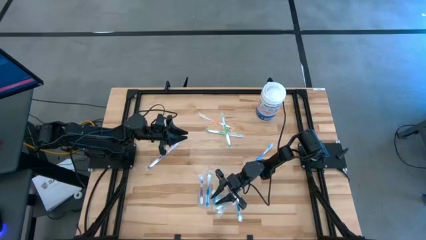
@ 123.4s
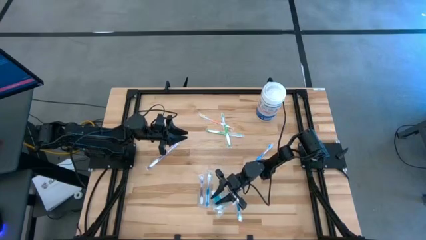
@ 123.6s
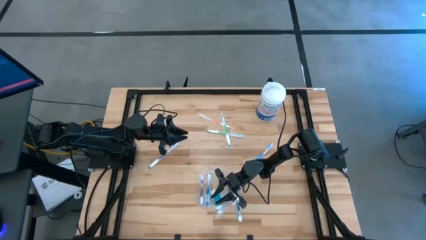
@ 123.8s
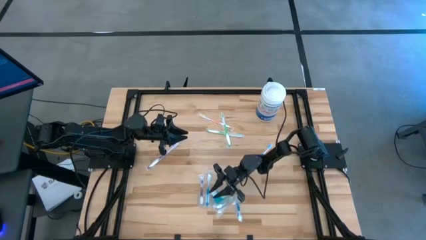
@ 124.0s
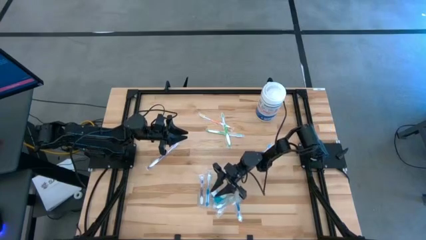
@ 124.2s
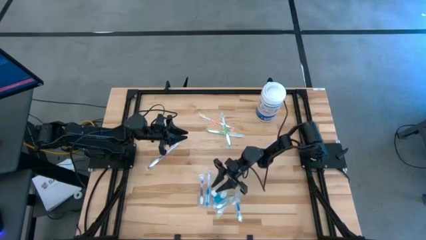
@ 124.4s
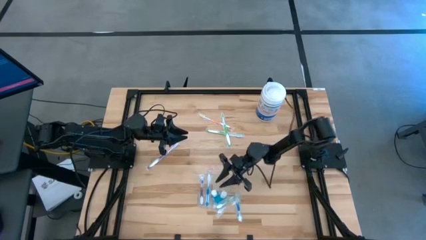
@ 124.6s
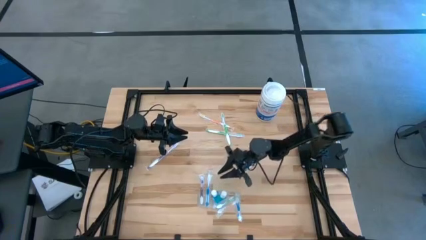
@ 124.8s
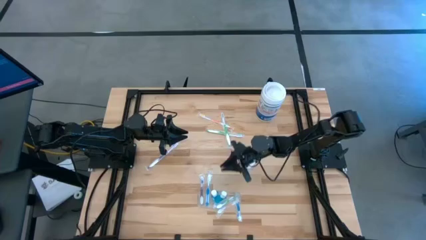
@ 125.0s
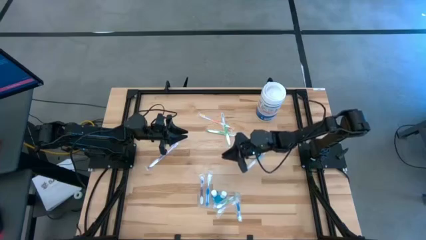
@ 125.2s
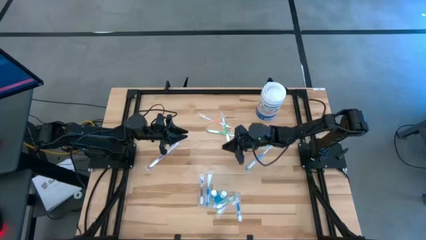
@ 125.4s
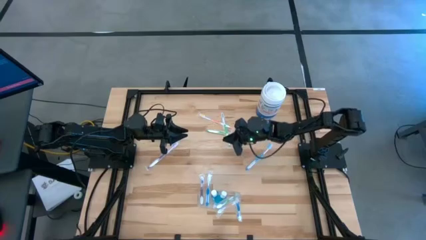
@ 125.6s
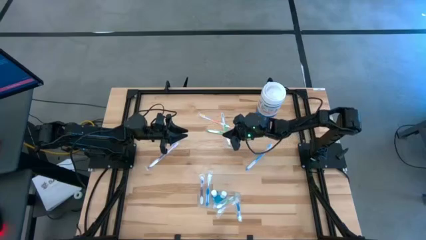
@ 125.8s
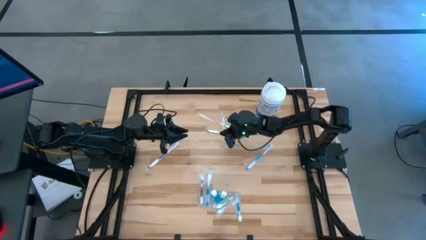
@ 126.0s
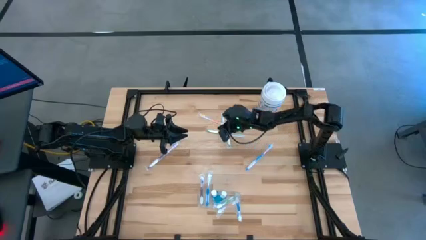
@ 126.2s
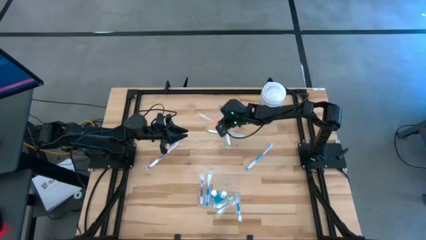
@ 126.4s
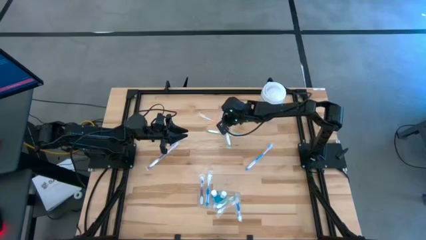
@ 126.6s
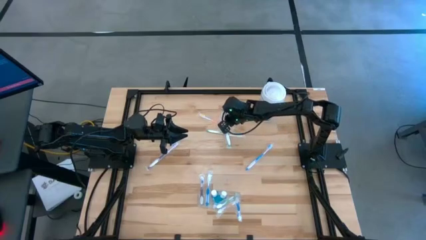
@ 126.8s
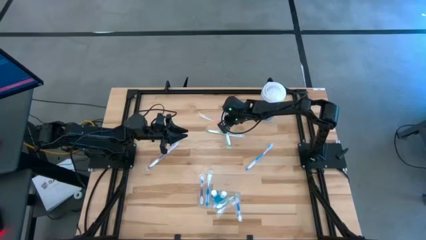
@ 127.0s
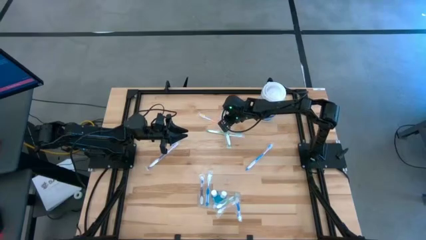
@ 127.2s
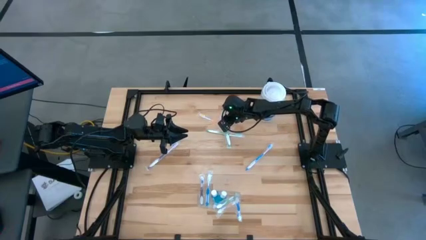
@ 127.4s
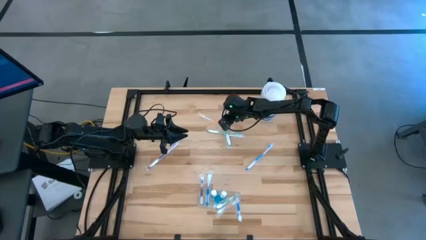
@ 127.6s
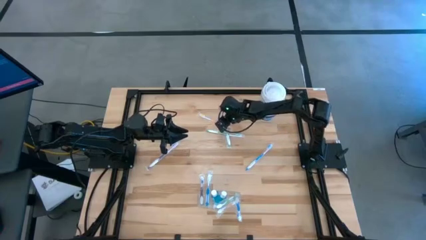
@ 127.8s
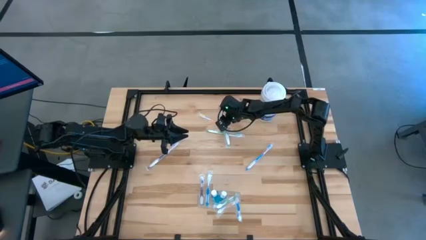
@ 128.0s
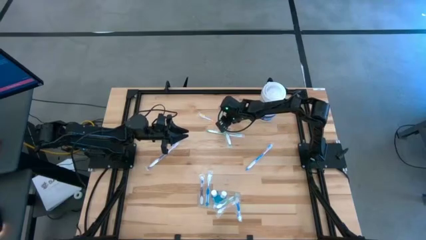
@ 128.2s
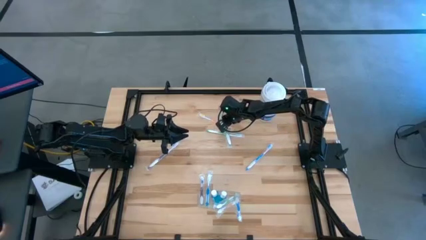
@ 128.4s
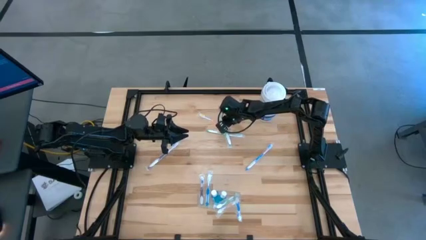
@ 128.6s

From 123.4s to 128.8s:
Task: Pick & Place toothbrushing station
Put the green toothbrush into the transparent organizer

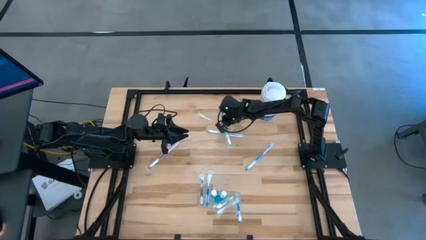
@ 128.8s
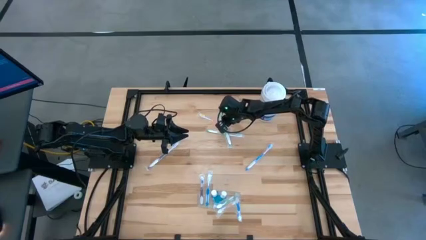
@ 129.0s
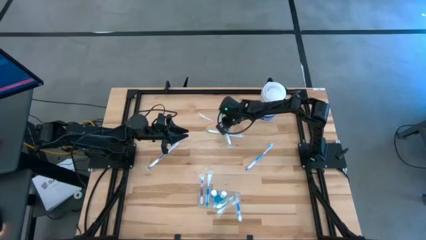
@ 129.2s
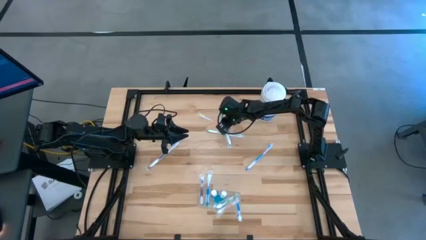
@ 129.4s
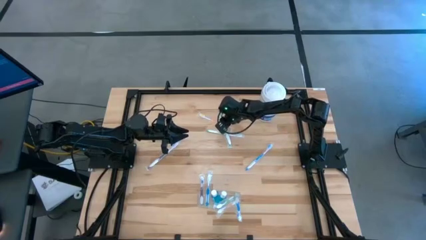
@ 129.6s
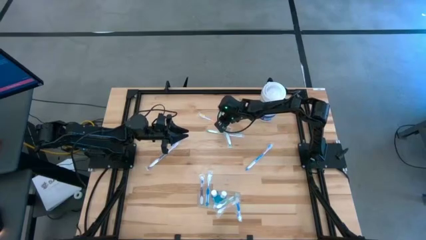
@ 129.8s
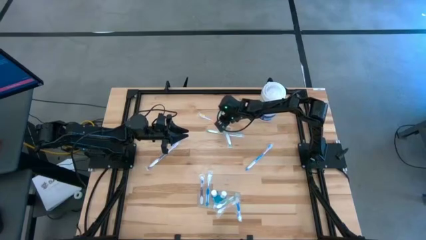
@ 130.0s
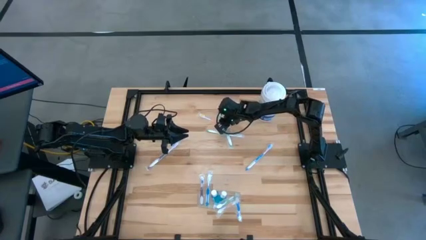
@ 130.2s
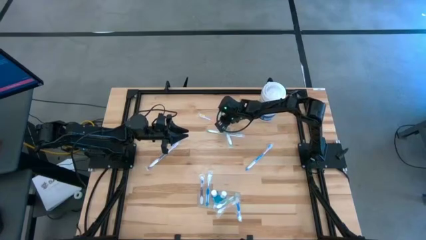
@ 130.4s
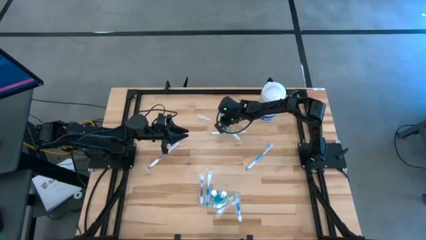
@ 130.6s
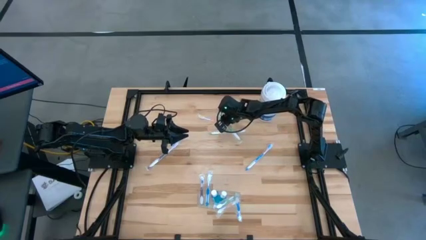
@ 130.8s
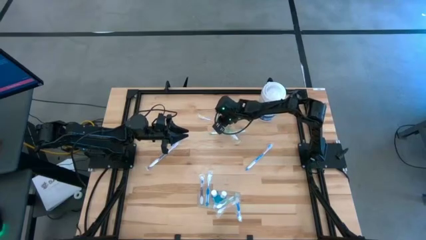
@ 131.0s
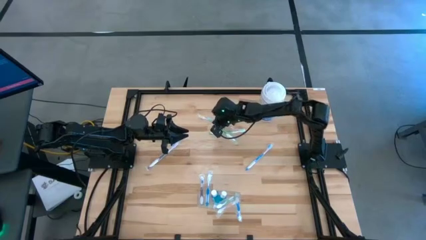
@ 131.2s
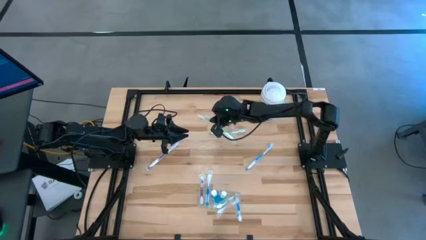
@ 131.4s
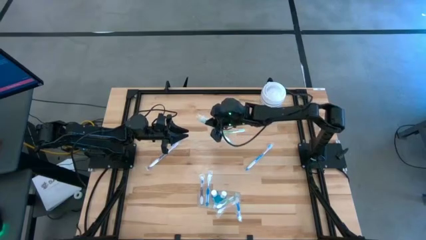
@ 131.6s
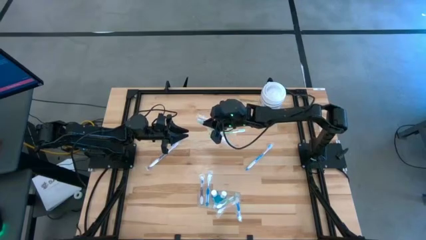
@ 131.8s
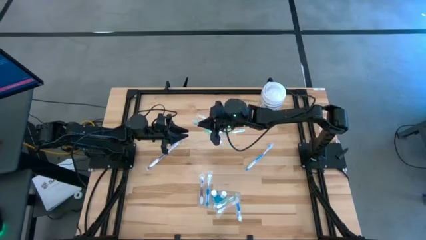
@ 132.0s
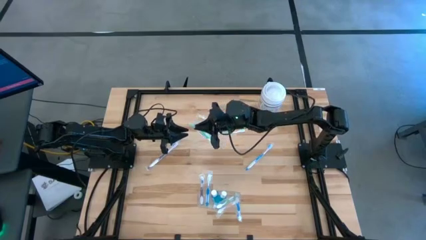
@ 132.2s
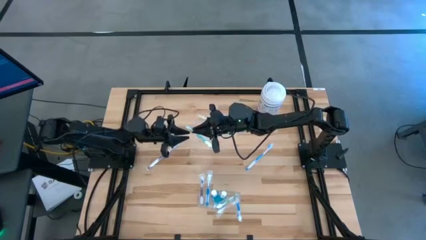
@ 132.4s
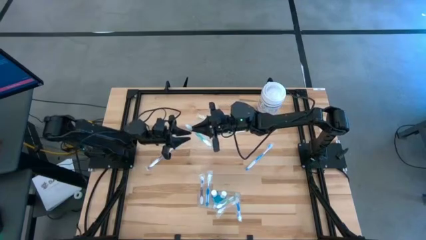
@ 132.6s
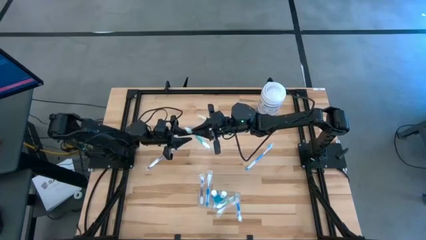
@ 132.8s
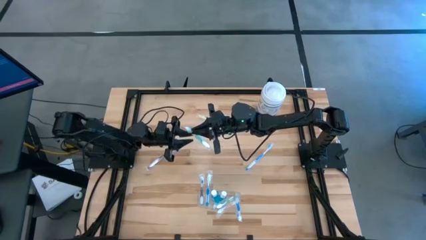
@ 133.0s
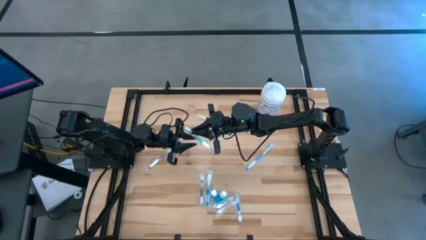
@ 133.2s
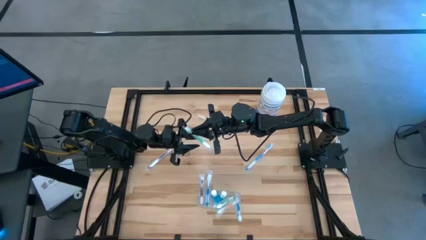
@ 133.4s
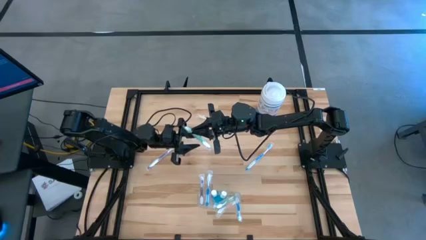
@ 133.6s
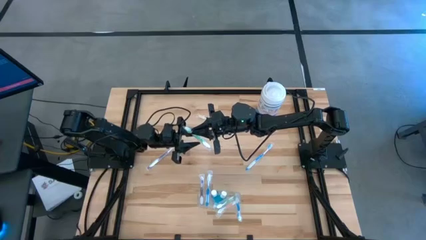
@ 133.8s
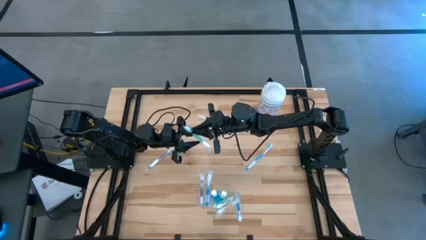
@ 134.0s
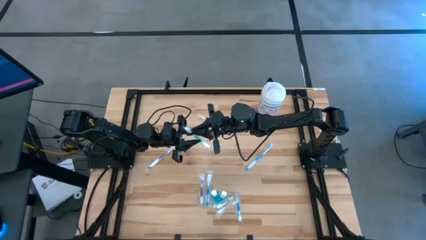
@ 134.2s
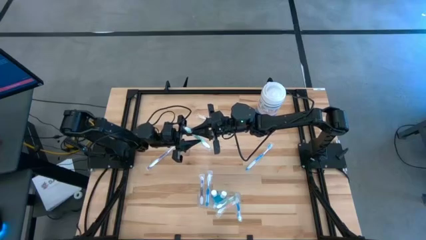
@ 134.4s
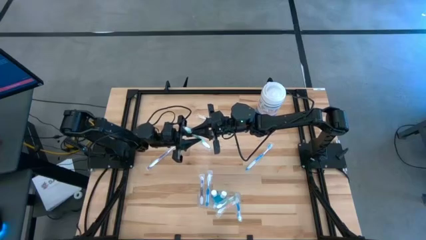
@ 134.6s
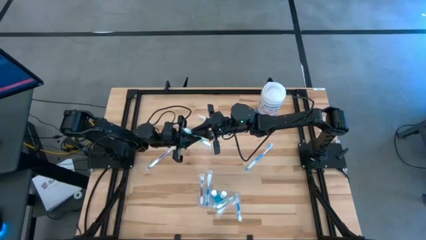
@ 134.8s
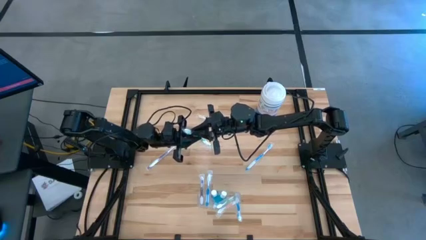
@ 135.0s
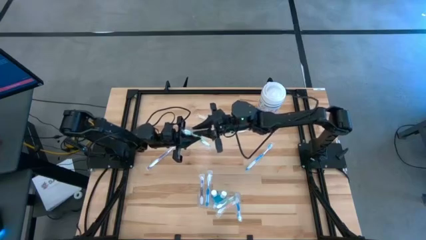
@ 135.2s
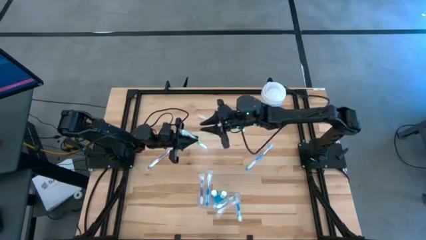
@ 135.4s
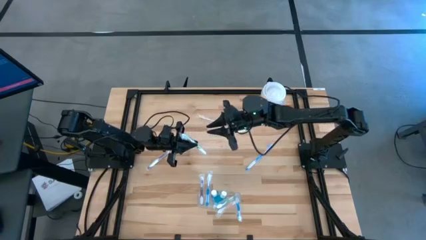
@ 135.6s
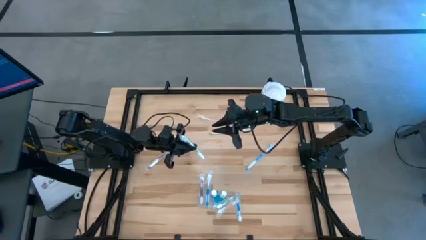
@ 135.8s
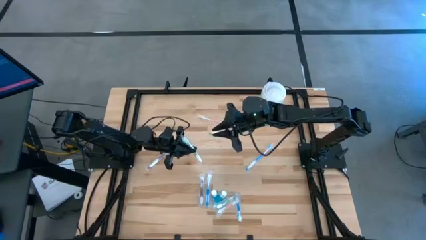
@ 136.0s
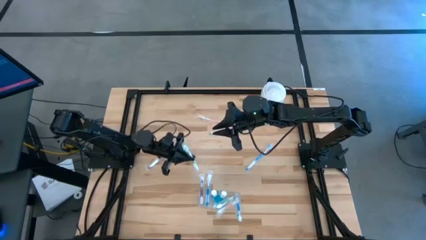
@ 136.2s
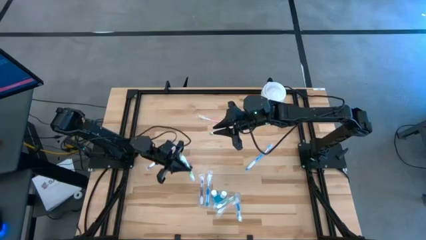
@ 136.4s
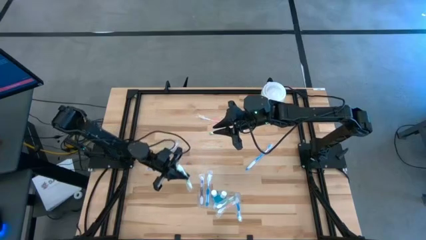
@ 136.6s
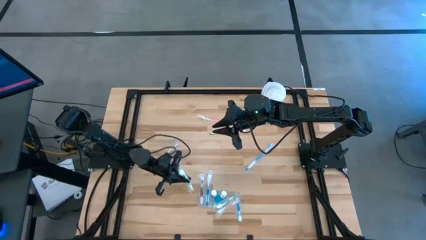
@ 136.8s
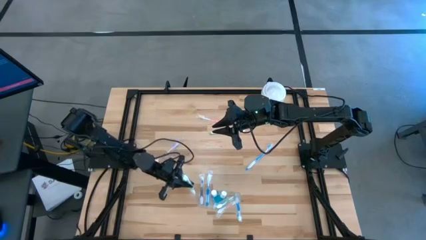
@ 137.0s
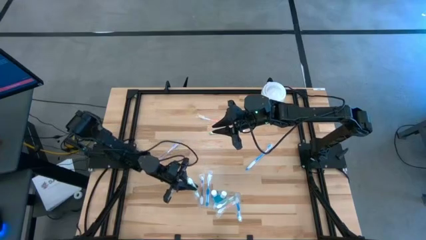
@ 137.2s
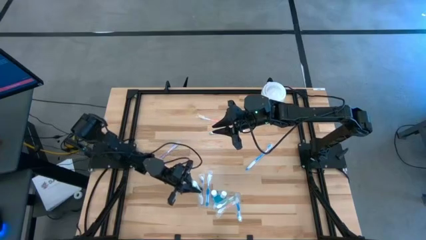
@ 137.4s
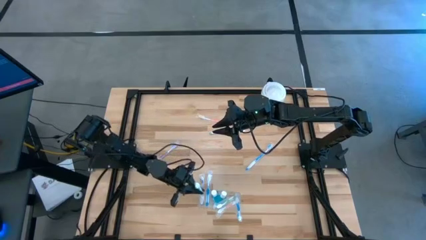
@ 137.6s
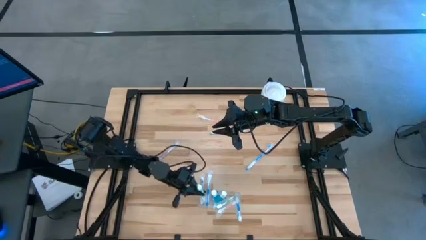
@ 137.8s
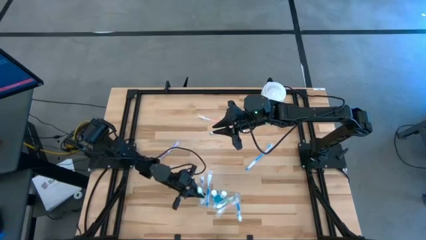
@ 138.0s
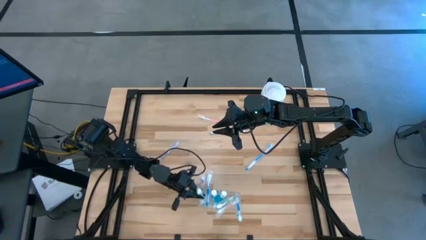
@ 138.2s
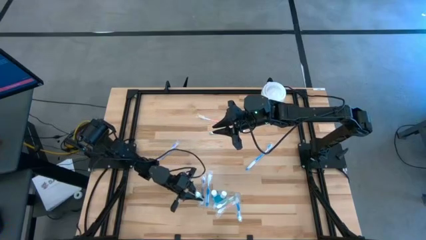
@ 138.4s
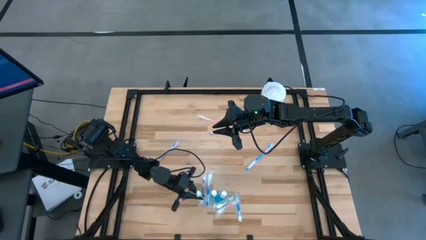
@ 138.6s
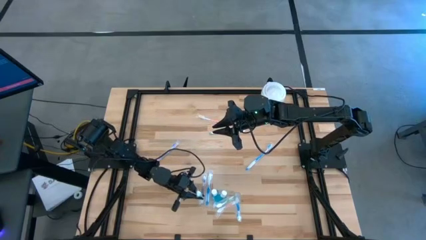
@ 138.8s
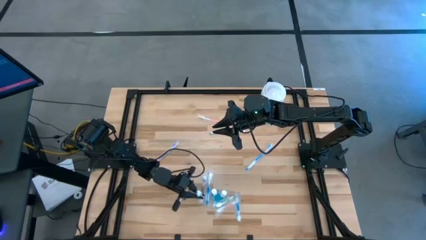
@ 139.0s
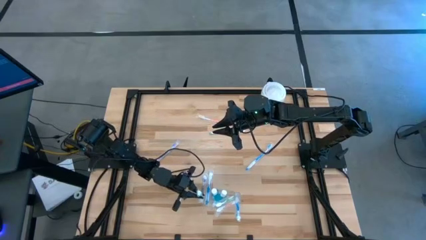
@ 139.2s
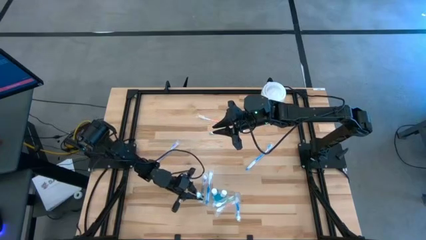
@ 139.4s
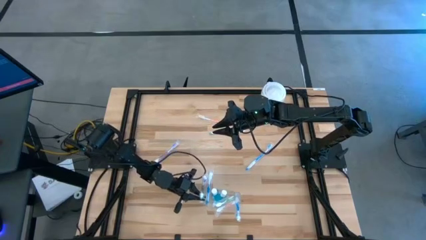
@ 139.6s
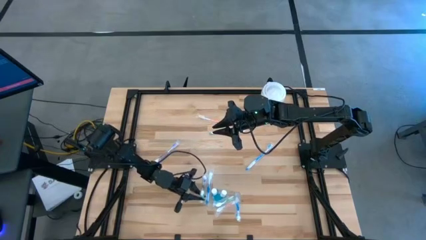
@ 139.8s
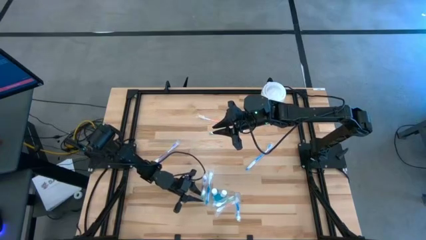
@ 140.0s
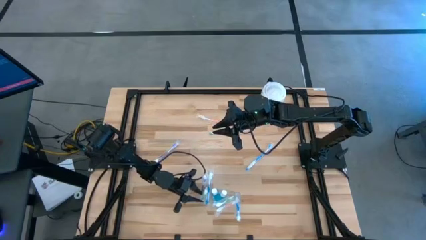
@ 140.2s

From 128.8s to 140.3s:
Put the green toothbrush into the transparent organizer
